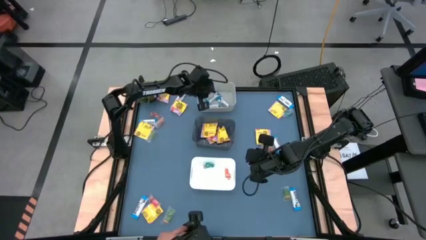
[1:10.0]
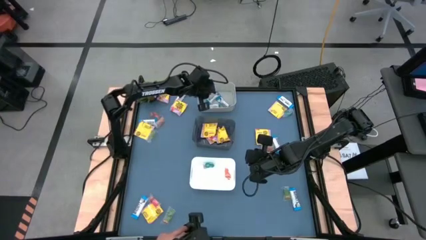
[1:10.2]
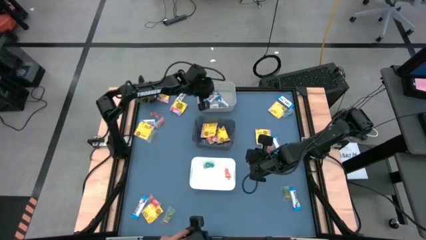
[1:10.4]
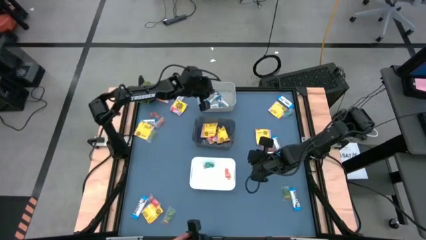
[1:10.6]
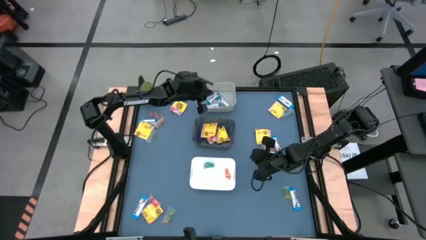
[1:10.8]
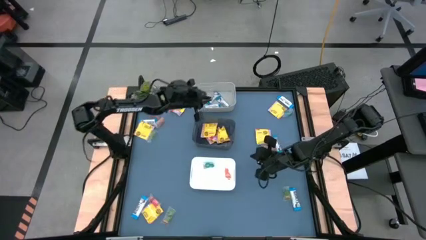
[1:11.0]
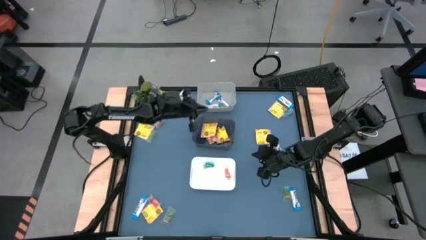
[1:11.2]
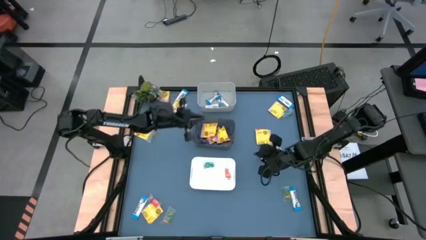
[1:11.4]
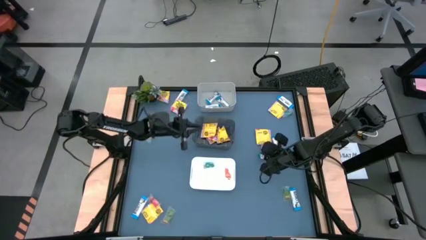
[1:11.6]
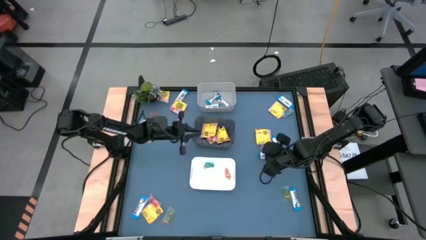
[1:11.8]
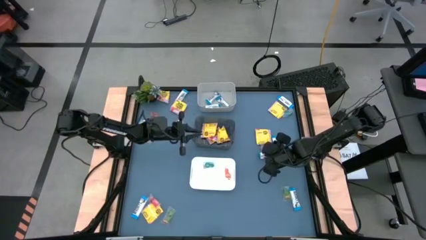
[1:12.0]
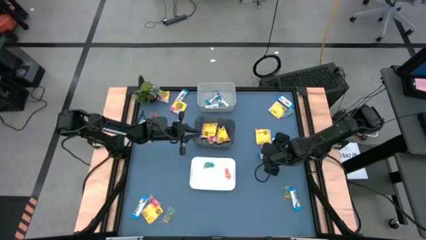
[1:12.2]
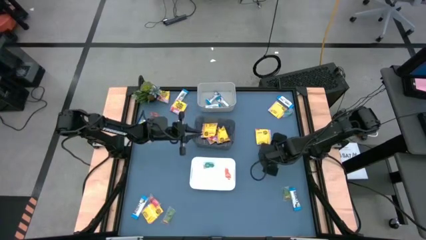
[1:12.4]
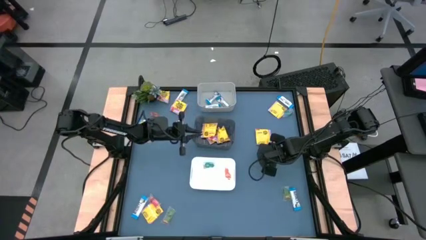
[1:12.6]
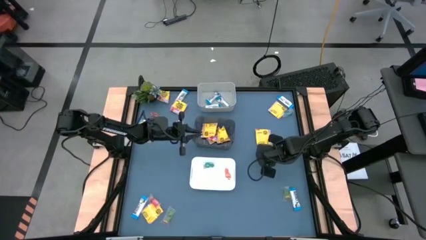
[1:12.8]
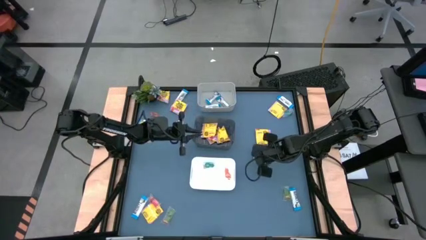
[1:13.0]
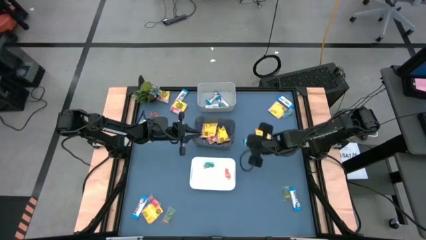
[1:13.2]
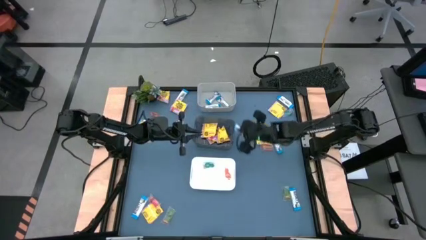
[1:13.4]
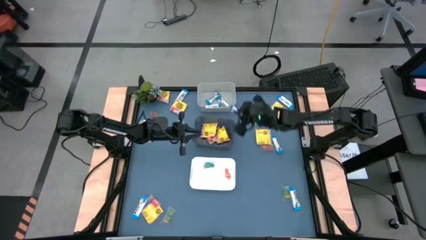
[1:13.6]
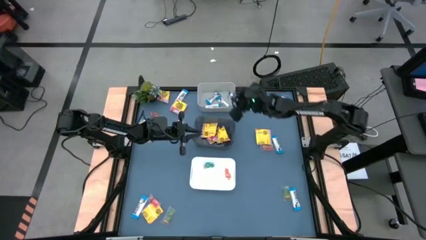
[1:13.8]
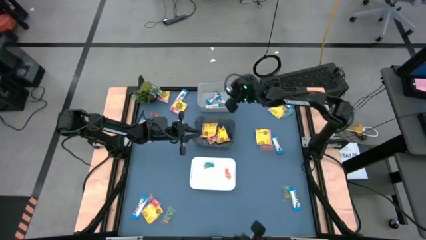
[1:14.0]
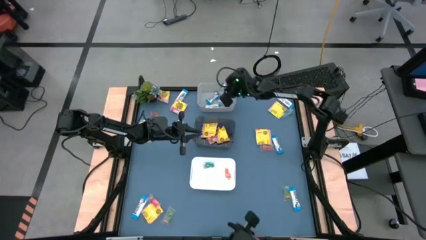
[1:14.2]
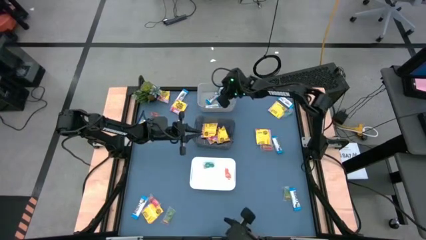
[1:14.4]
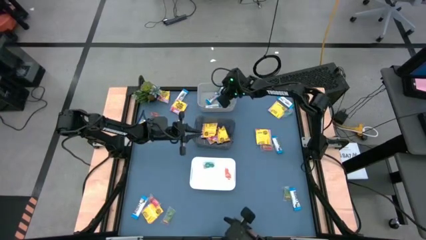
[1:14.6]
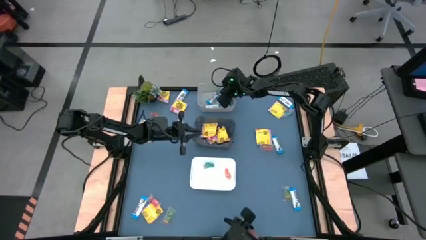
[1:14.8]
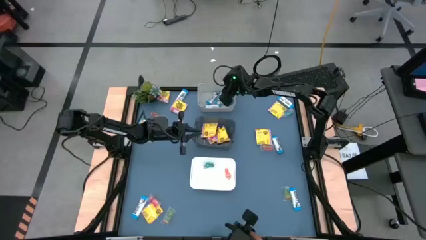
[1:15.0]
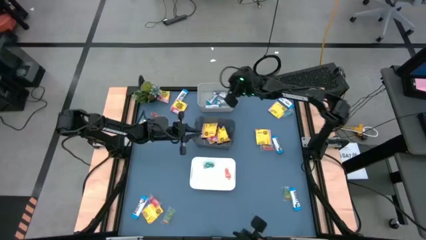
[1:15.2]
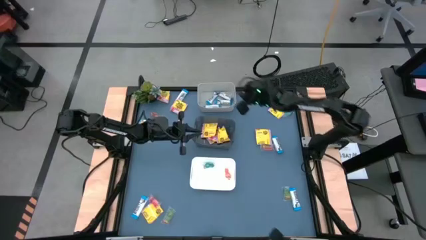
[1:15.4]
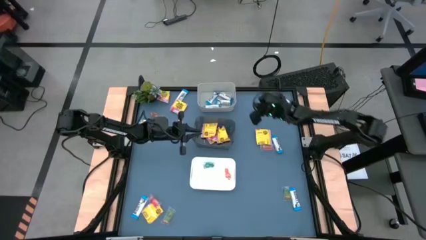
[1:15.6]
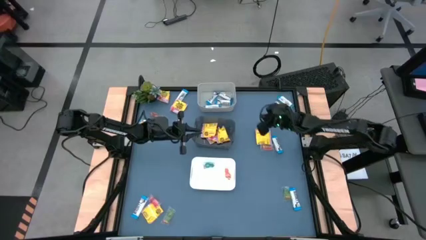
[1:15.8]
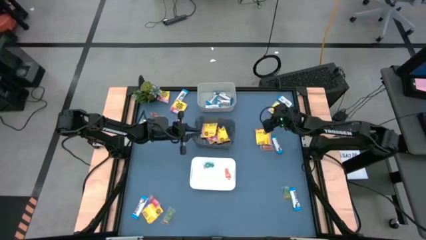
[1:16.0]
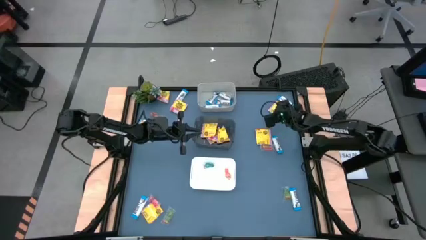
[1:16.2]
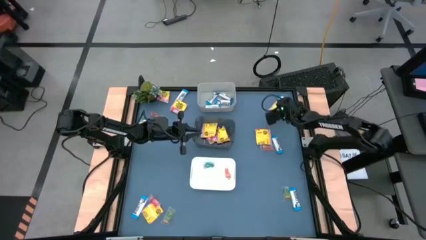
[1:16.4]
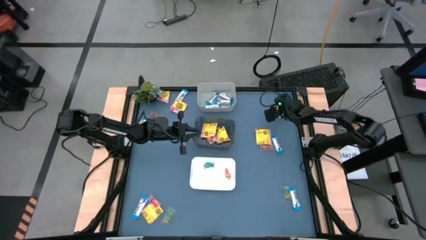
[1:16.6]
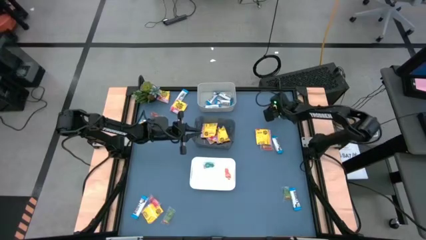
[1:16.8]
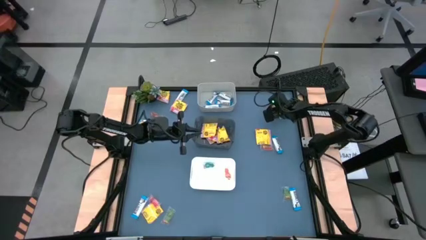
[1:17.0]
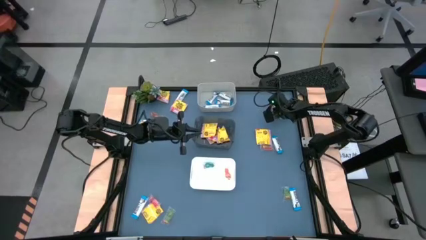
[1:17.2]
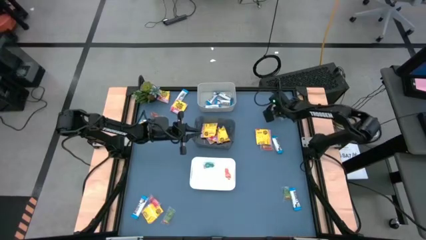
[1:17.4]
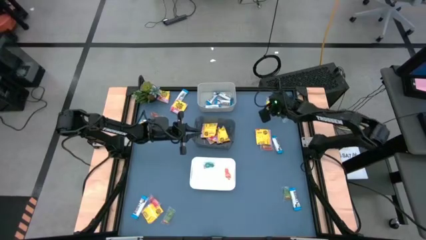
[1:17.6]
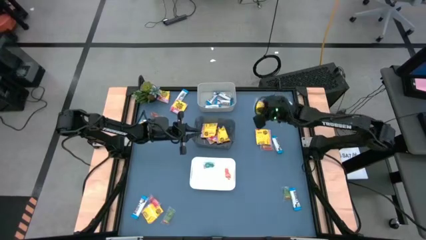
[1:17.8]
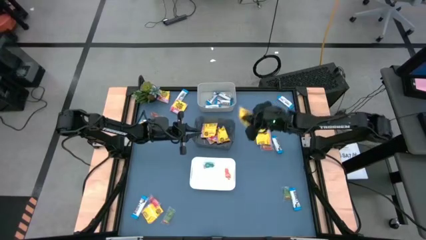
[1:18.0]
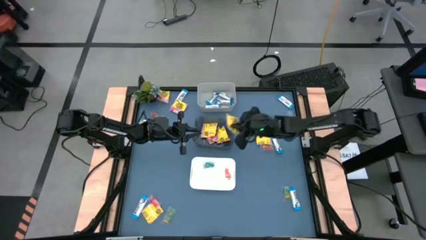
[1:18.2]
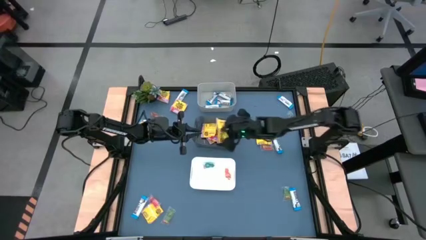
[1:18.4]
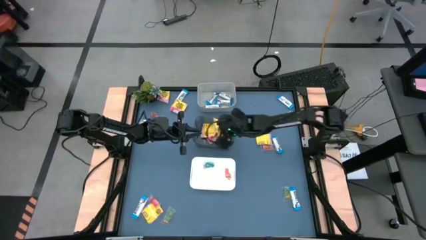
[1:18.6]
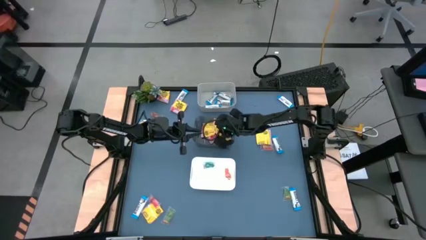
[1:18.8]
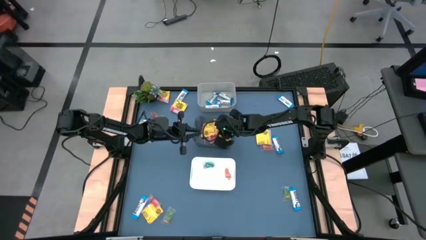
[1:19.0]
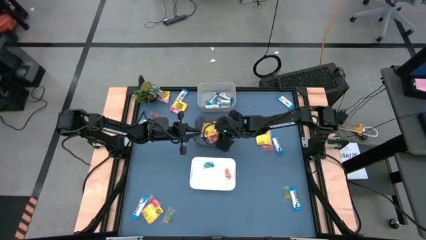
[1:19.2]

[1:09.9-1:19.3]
Task: Sort candy
Put the yellow candy into the black bin

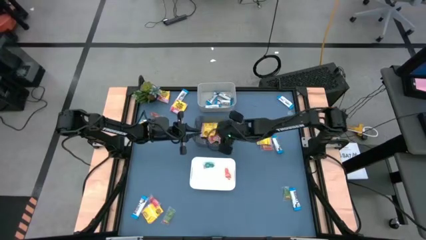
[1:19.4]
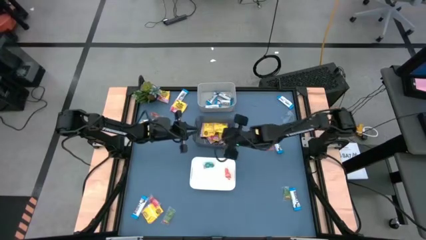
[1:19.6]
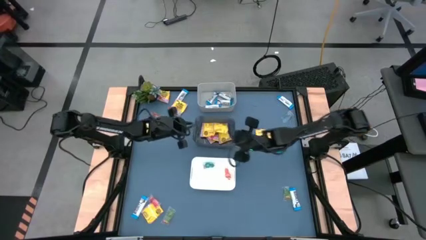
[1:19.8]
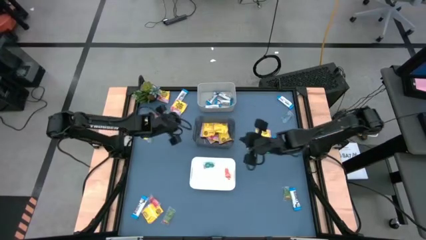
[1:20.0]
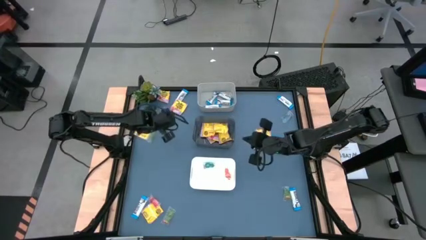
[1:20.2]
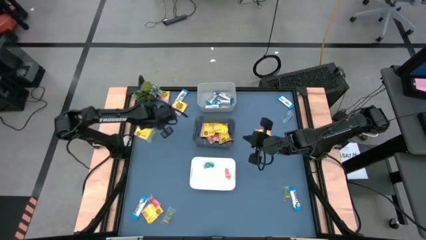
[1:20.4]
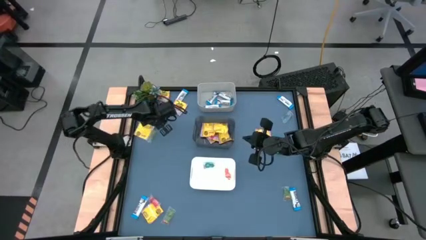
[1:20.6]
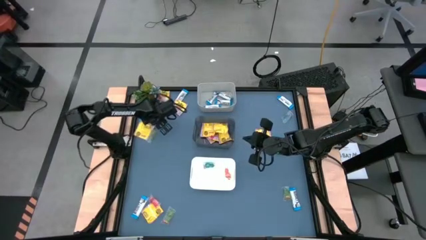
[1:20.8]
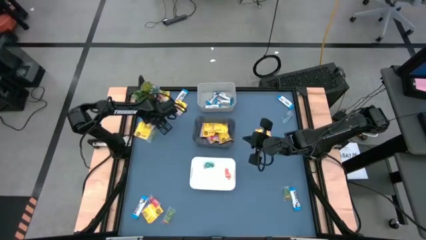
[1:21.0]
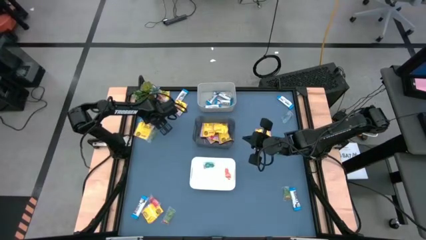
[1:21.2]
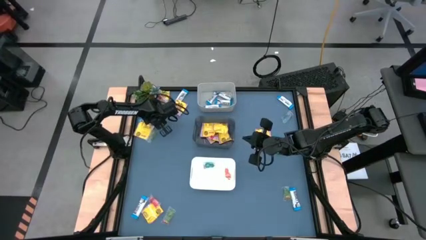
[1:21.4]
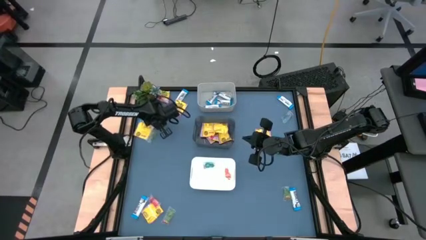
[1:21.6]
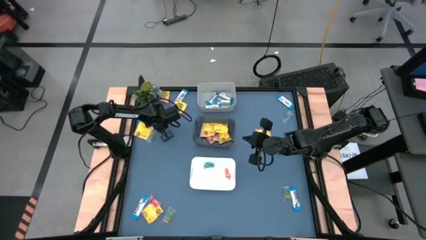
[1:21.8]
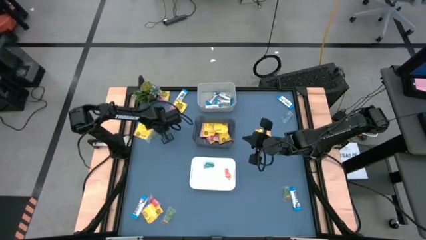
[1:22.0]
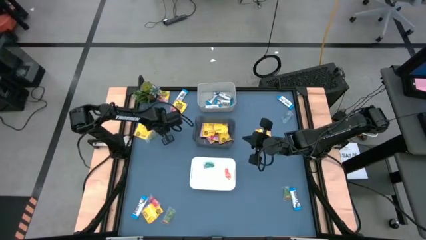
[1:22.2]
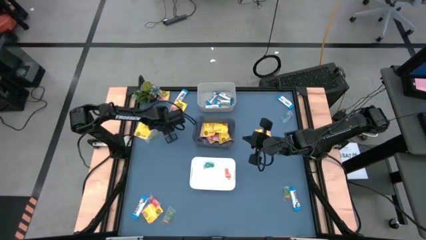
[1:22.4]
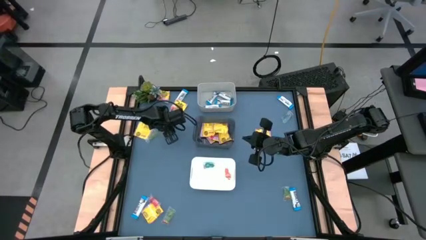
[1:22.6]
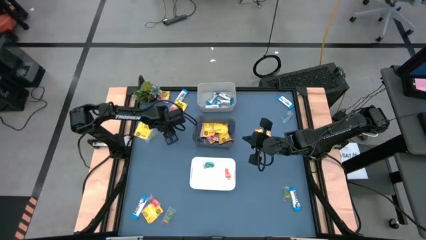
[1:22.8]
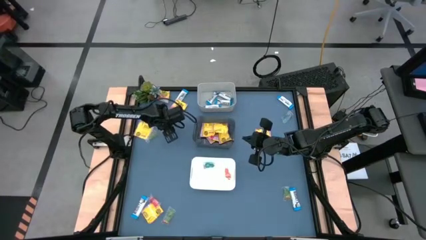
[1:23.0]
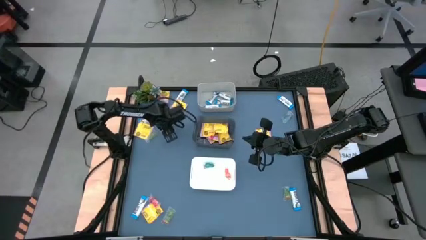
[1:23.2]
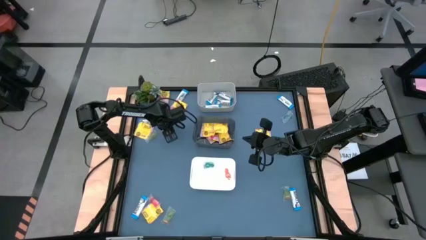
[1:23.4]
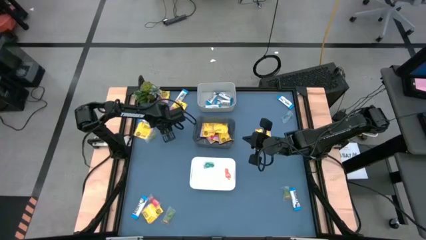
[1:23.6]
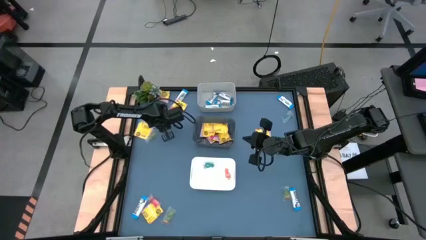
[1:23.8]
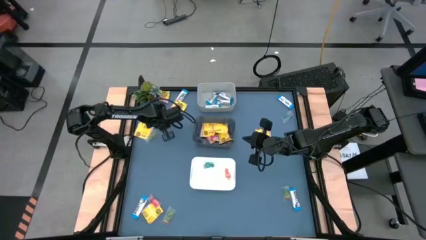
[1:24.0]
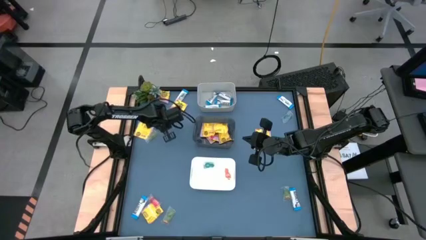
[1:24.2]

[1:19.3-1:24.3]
Put the orange candy into the white bin

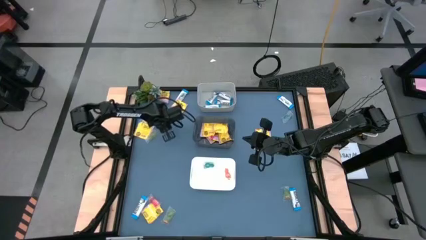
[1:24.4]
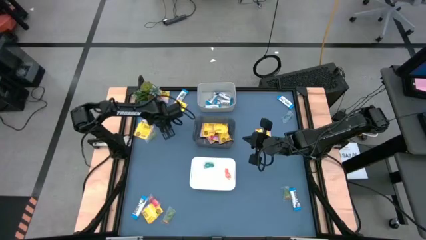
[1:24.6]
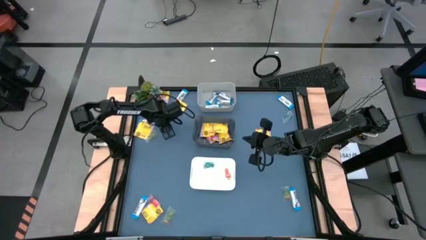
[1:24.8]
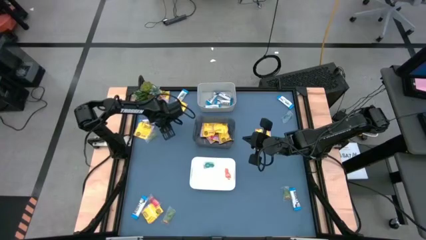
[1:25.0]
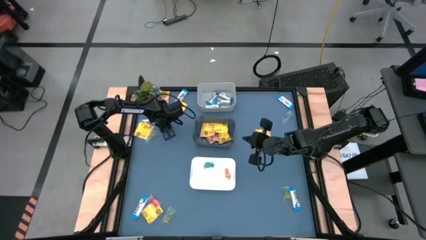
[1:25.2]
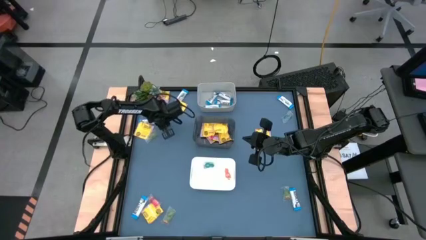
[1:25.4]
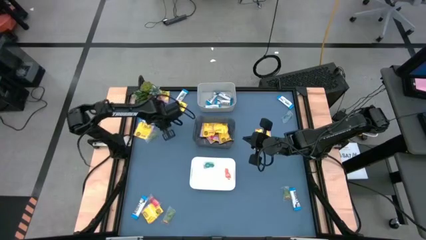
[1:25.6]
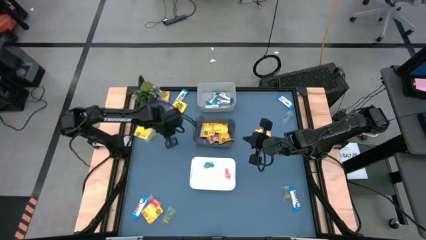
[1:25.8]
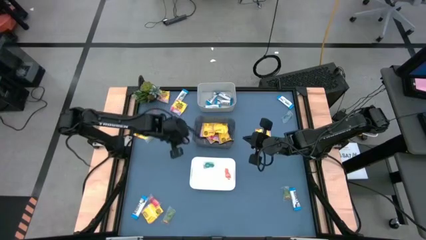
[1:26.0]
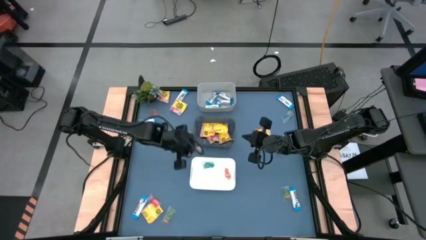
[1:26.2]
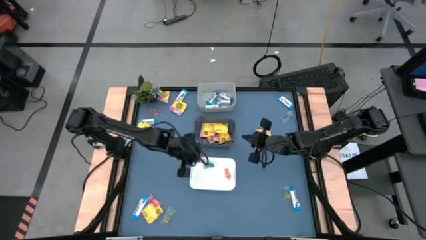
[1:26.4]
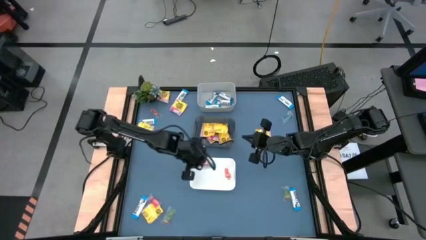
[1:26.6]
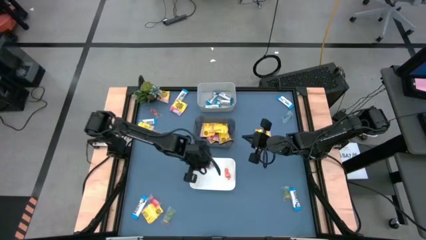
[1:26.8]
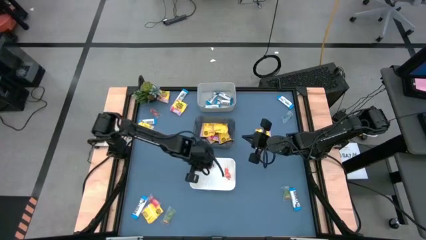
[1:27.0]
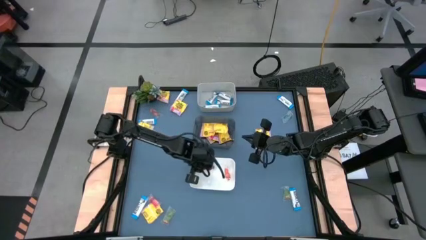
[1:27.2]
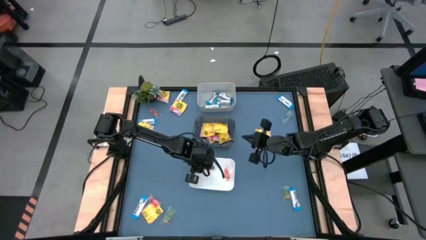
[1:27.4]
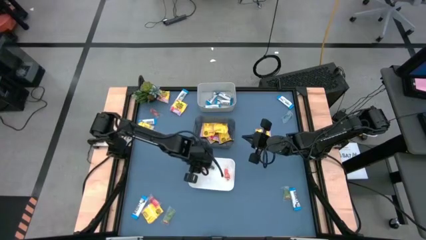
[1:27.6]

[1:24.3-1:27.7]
Put the orange gummy candy into the white bin
